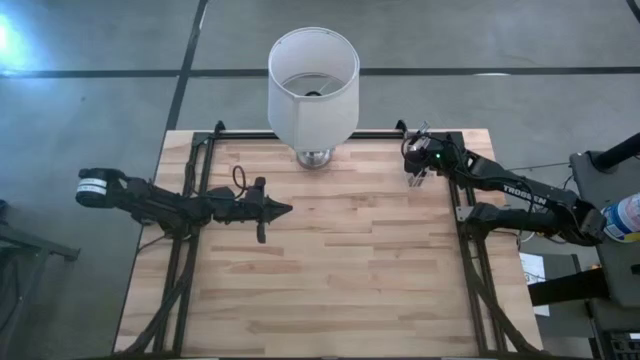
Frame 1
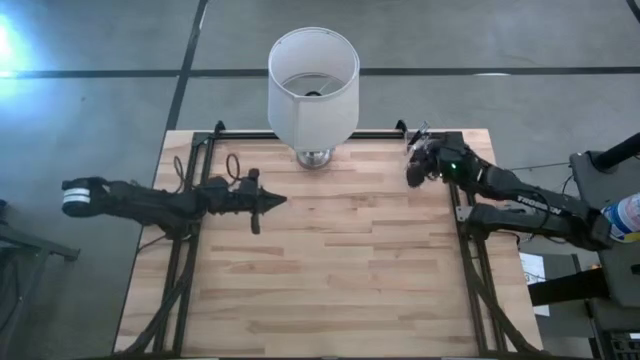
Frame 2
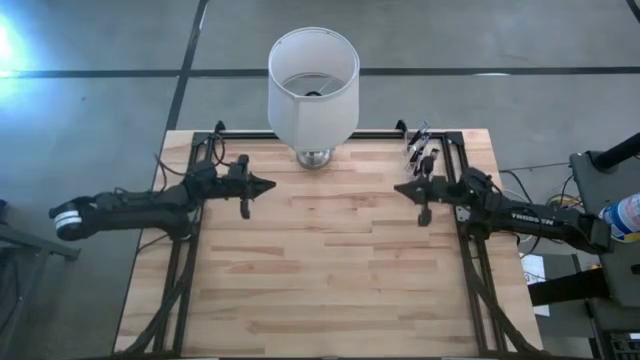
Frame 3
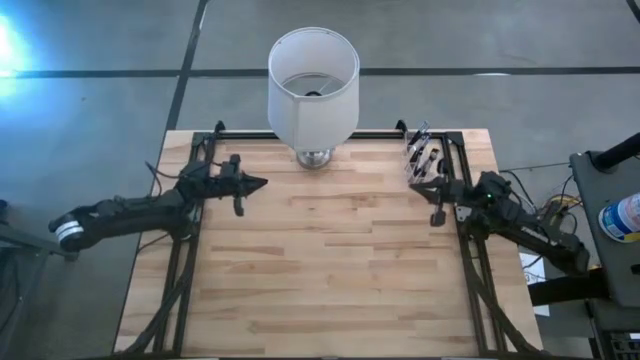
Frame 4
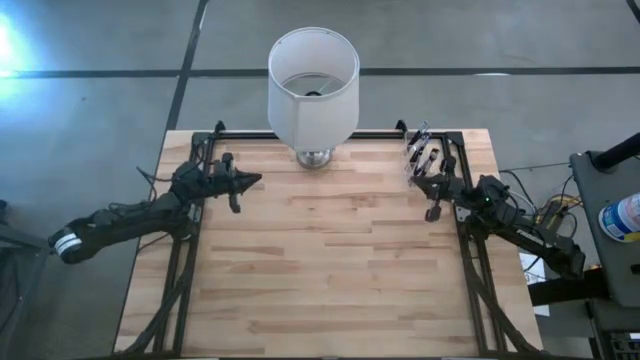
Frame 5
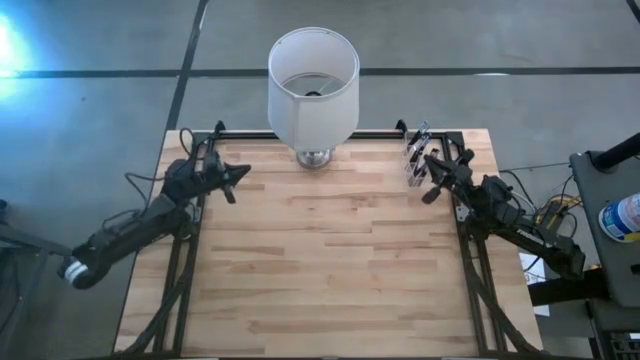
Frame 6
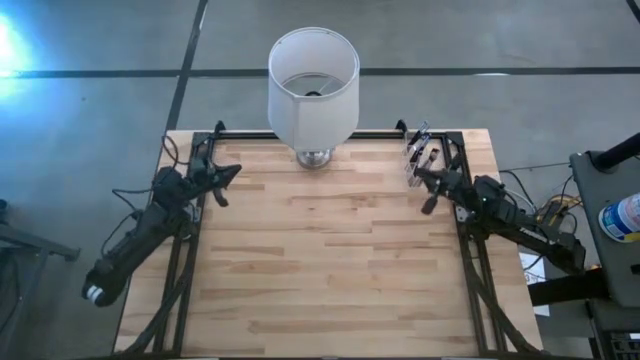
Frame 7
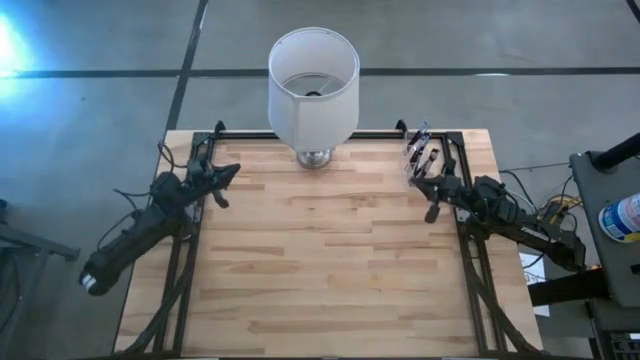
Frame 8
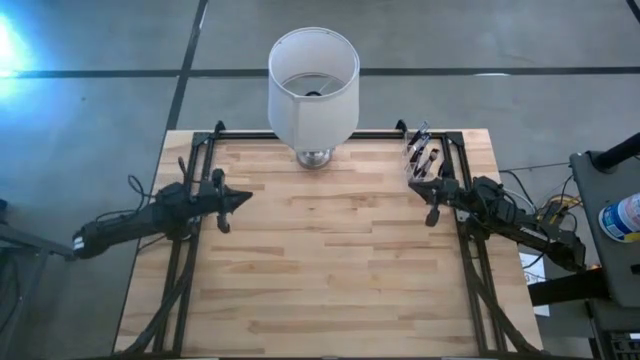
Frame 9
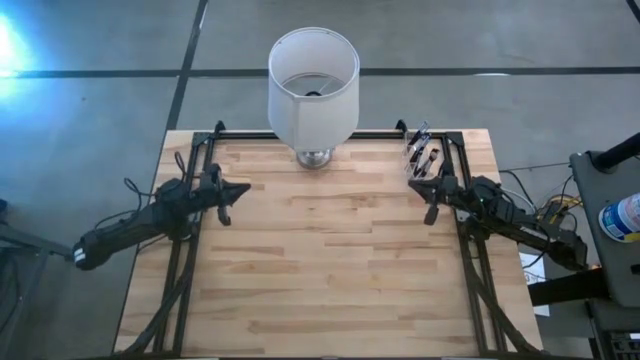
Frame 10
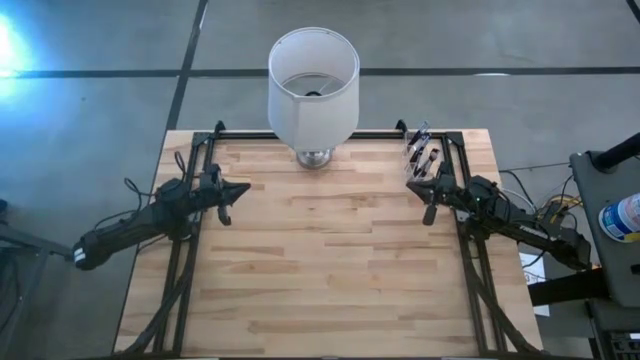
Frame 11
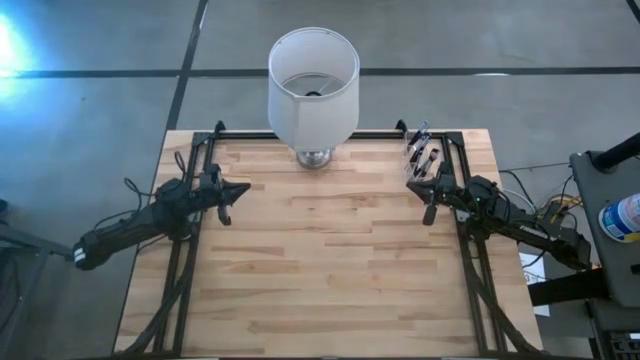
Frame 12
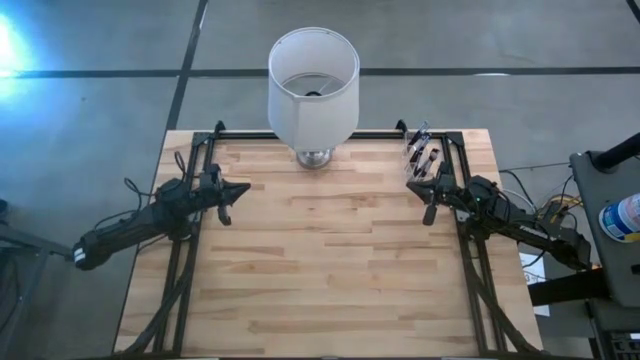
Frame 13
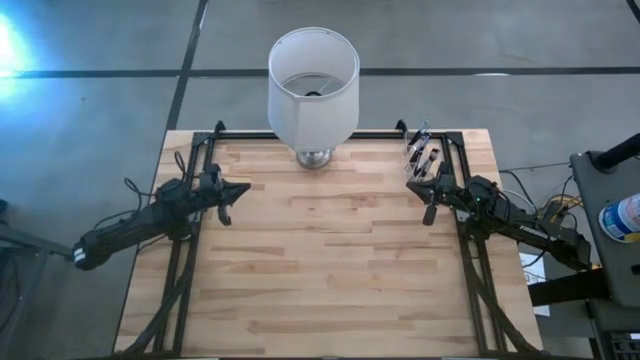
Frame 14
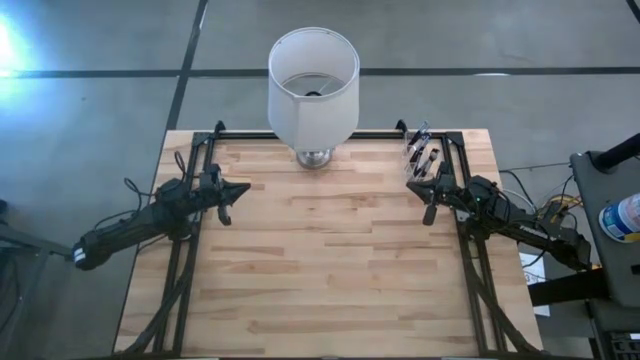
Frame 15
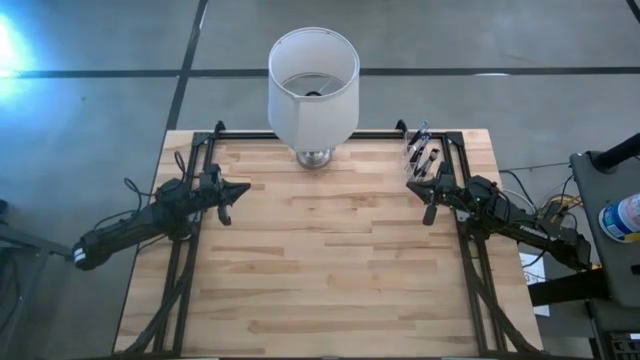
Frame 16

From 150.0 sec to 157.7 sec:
Task: Put items in baskets/containers
Return to Home Position

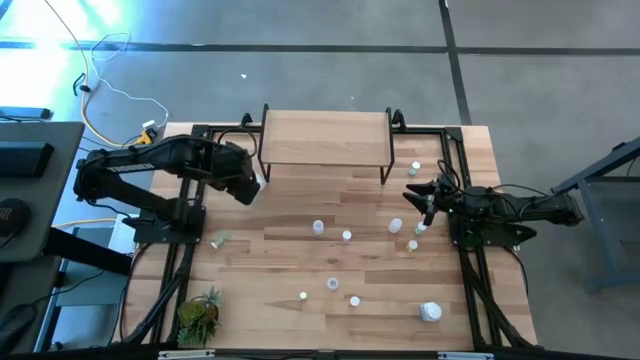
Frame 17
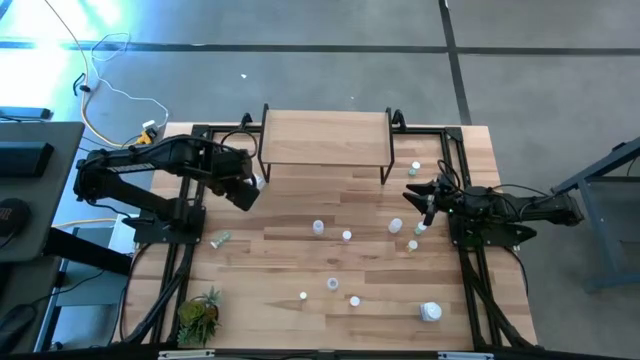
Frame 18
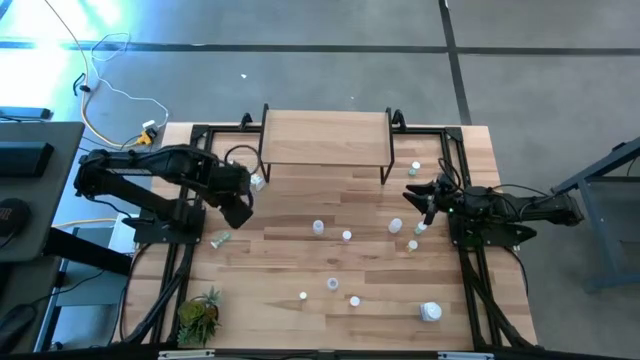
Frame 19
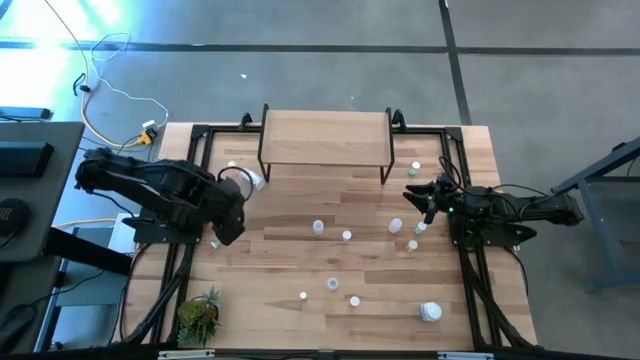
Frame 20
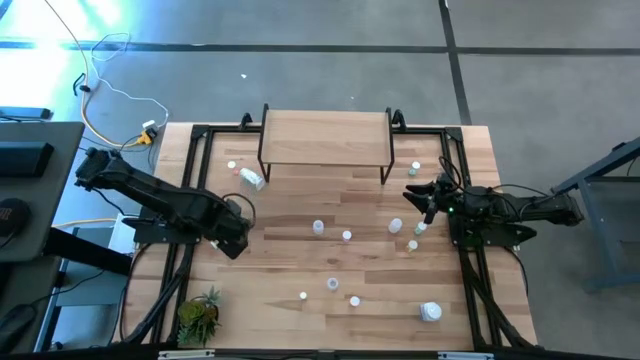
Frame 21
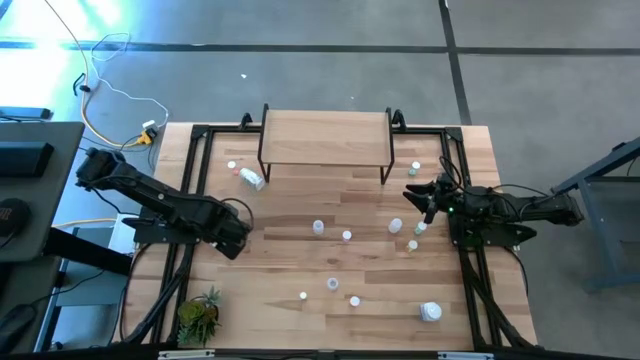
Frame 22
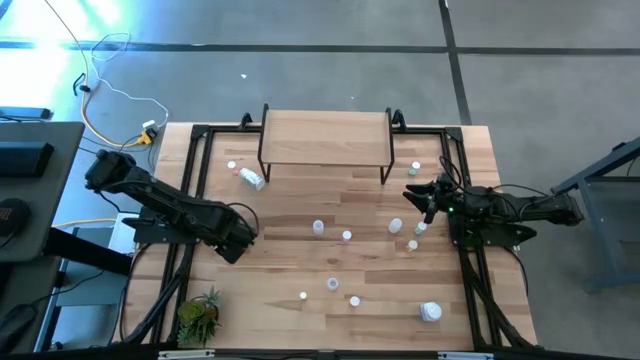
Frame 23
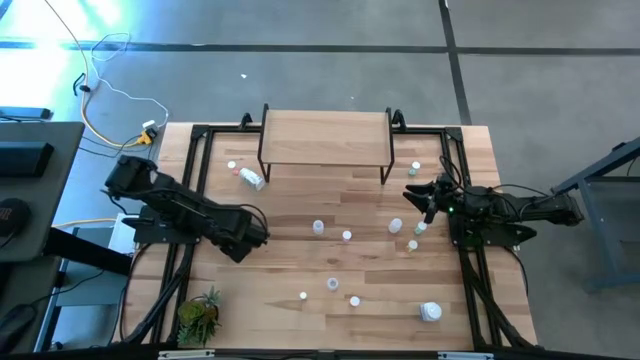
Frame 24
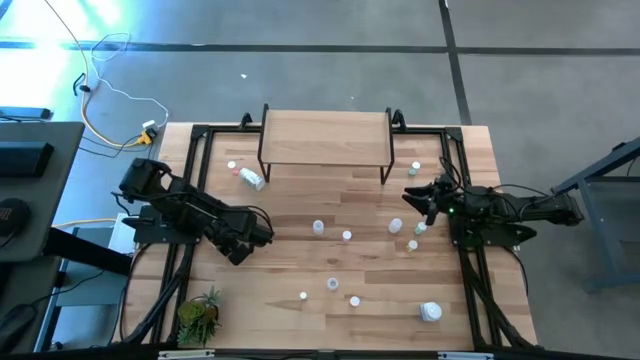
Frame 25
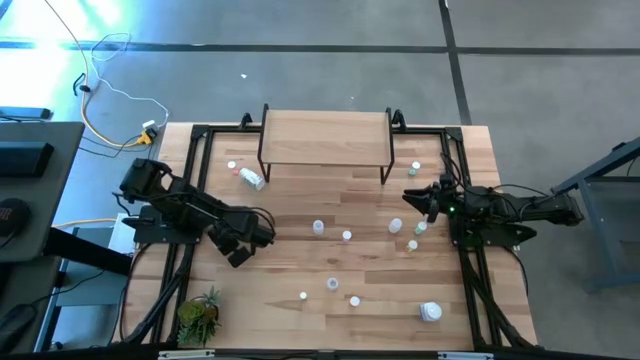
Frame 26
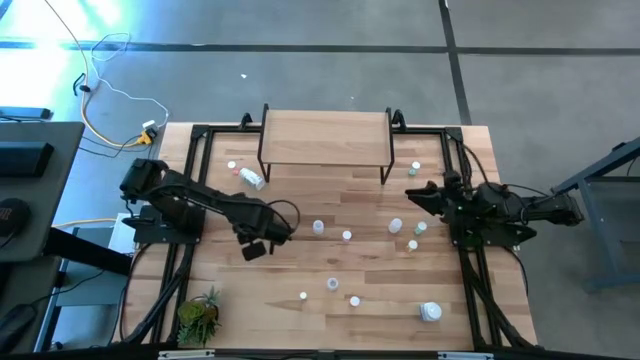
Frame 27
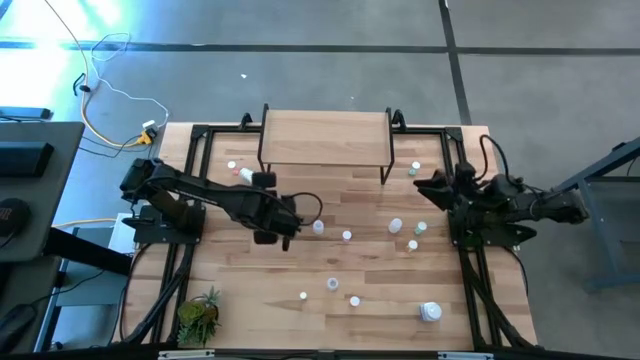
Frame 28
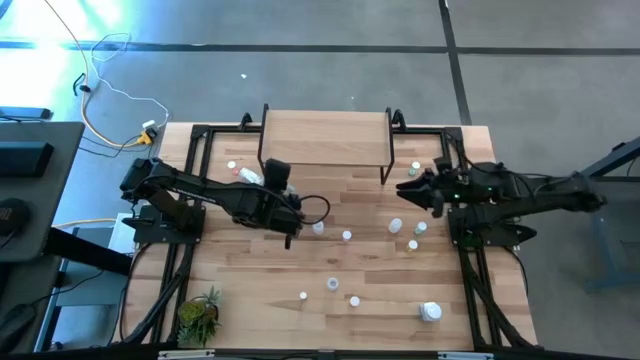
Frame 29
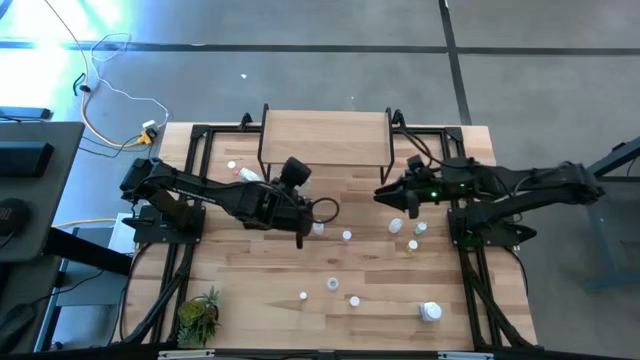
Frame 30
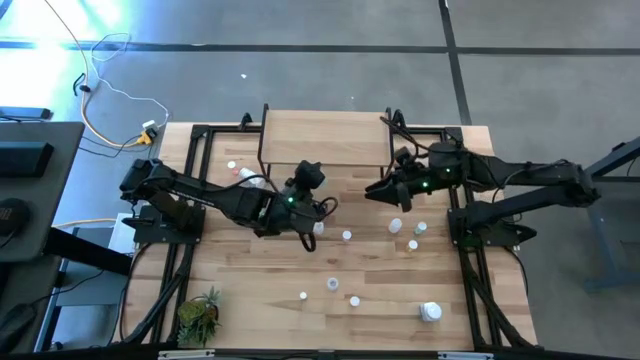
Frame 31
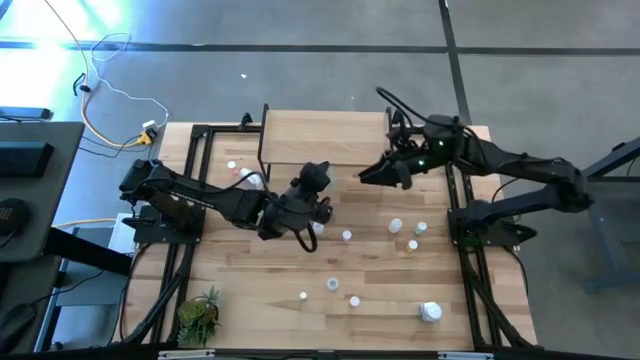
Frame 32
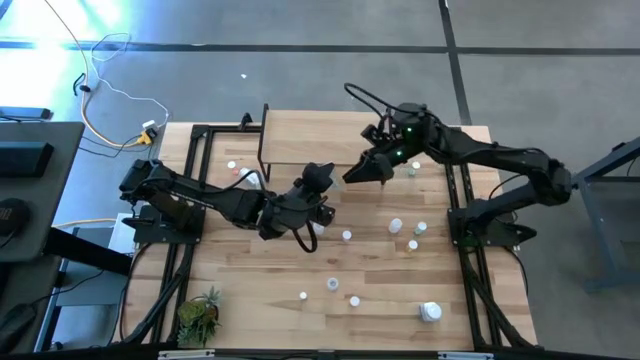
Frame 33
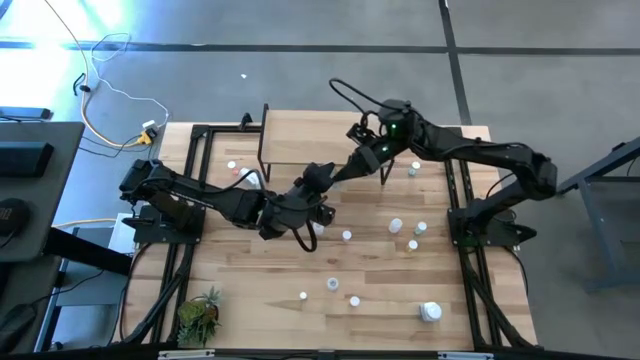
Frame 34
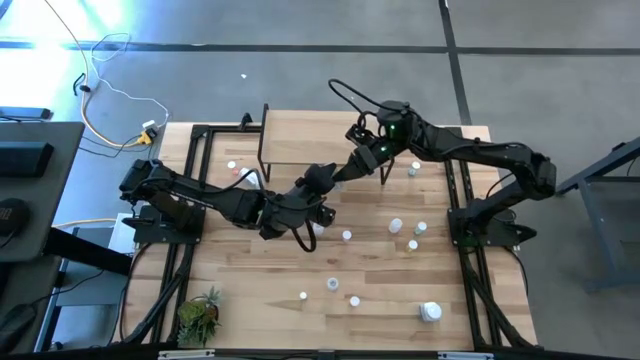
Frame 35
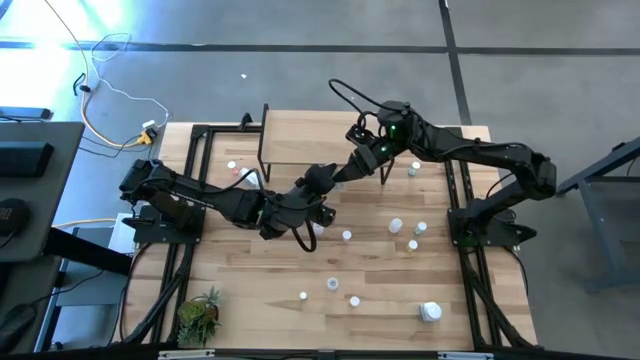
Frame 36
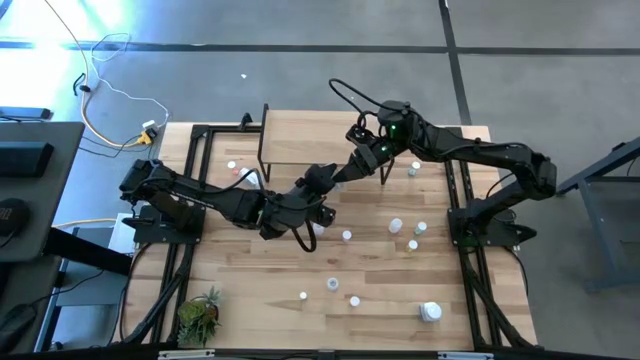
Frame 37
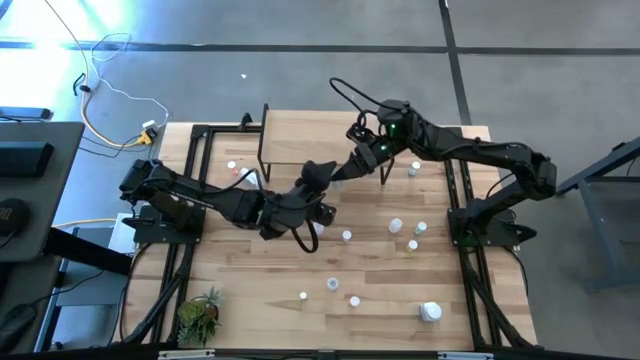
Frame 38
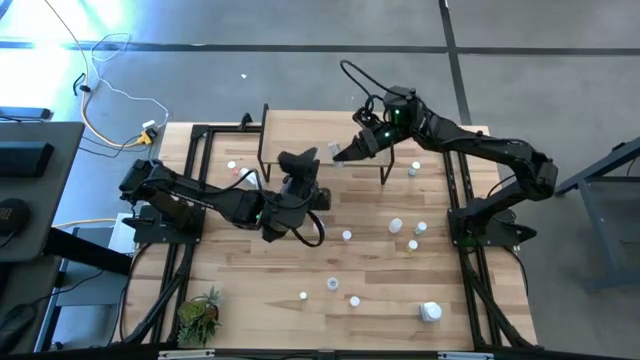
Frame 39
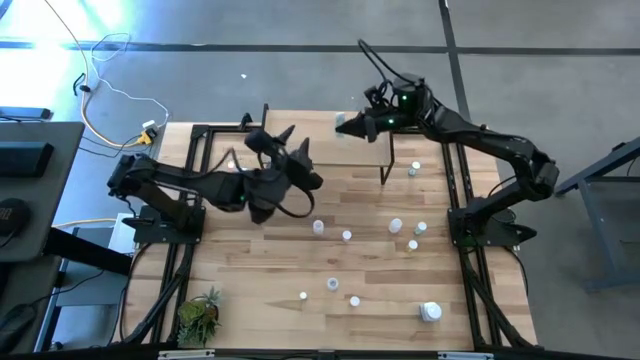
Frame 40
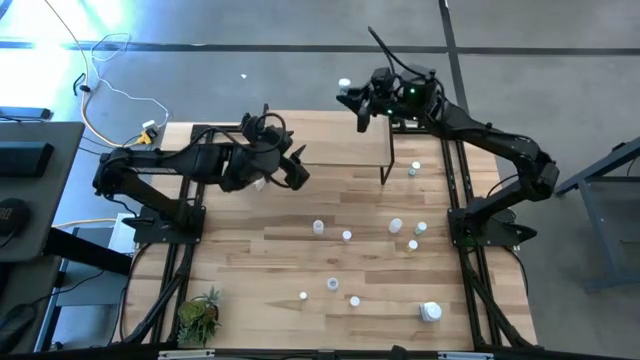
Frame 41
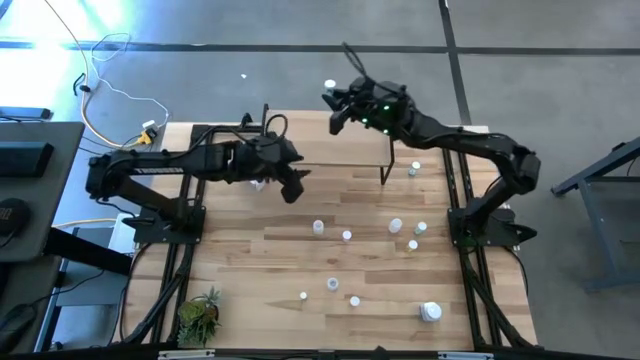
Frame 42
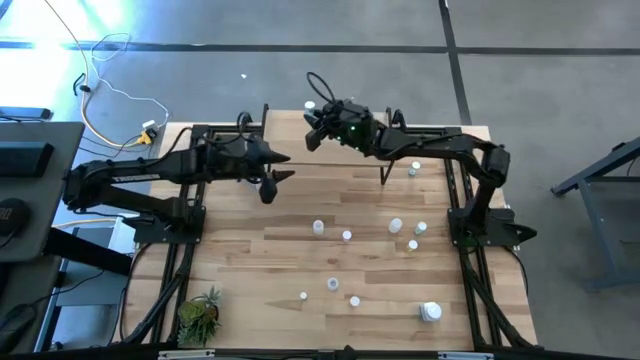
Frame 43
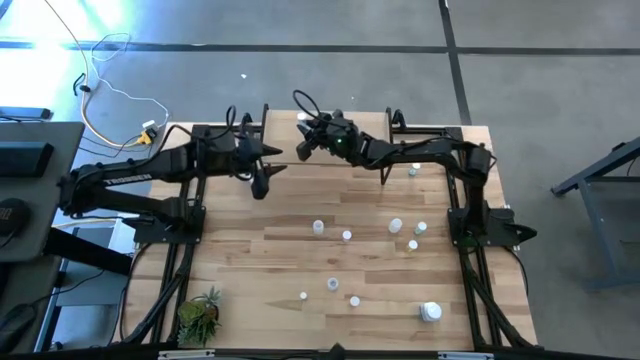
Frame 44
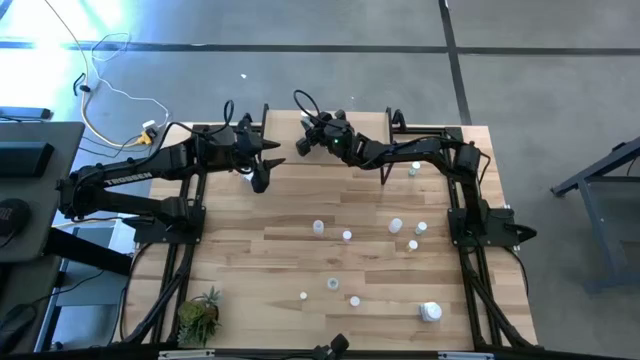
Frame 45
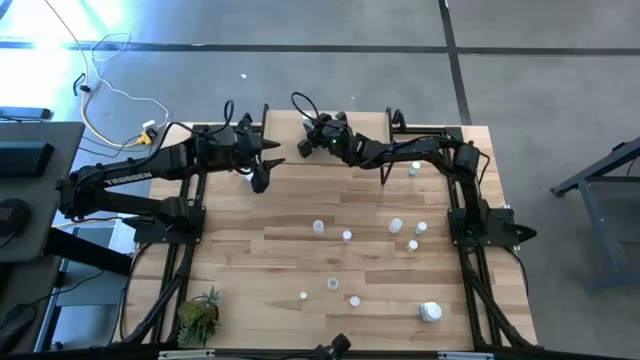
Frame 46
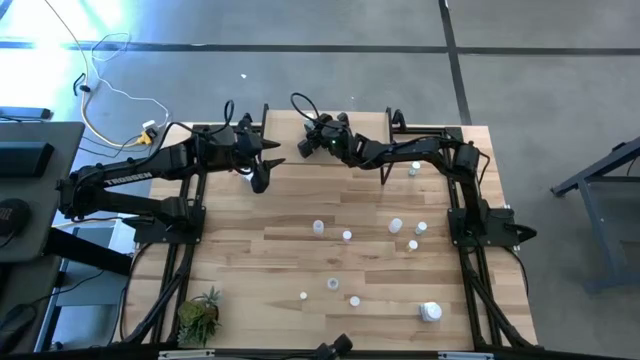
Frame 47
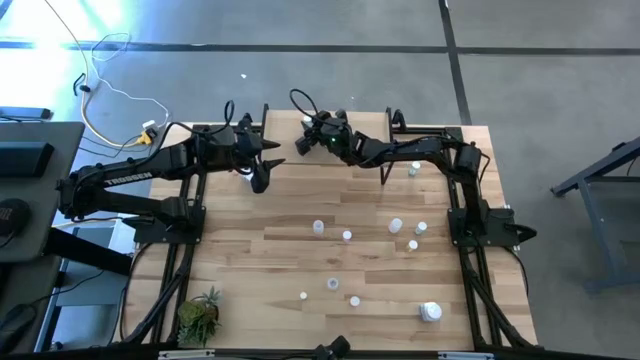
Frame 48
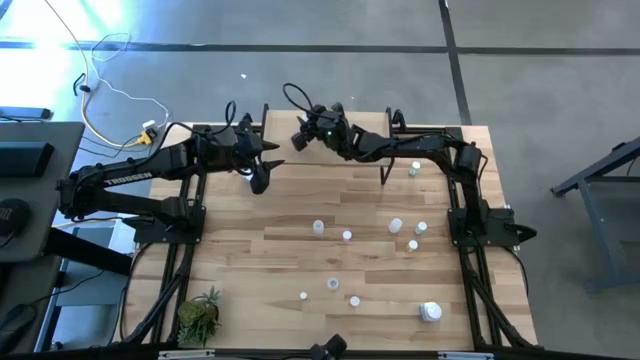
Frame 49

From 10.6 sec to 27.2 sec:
Task: Pick and place medicine bottles onto shelf by color
Put the blue pill bottle on the shelf
